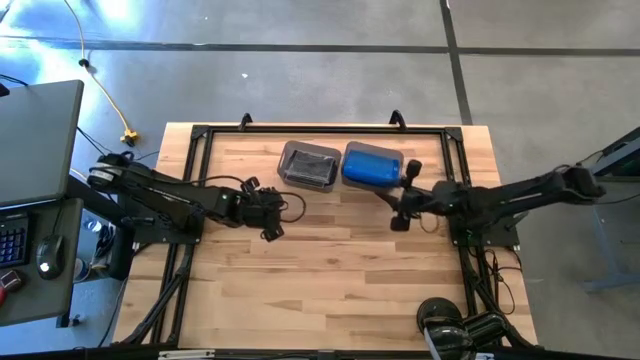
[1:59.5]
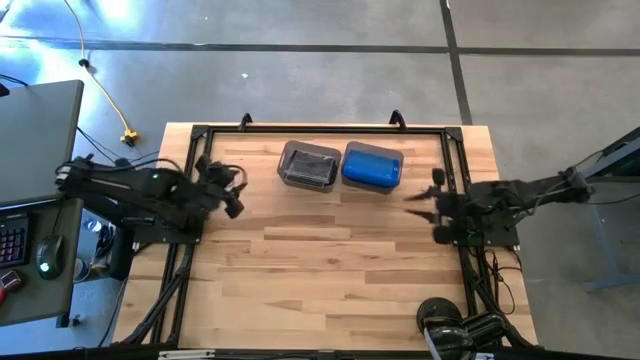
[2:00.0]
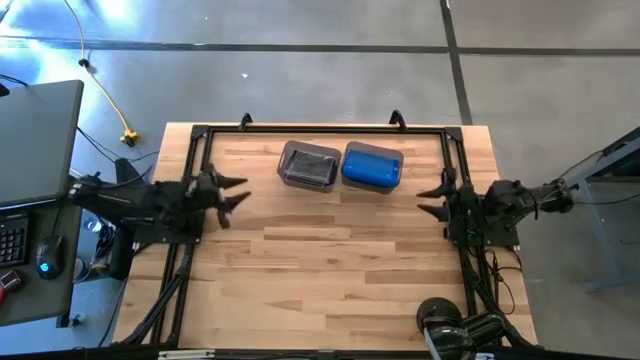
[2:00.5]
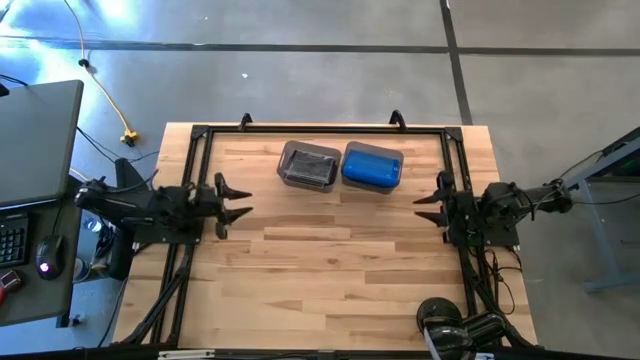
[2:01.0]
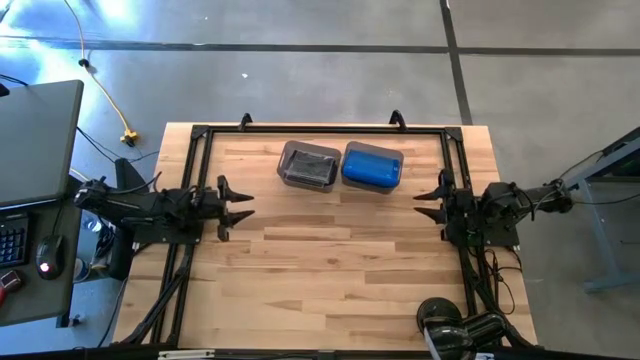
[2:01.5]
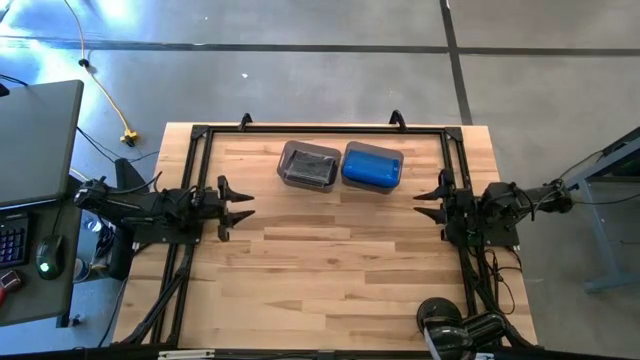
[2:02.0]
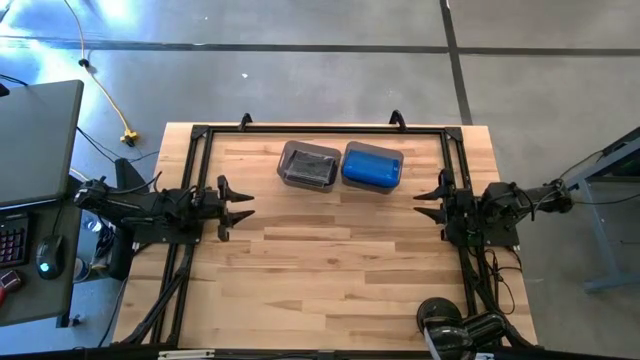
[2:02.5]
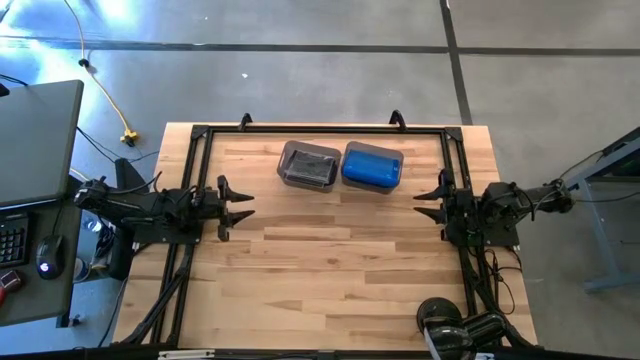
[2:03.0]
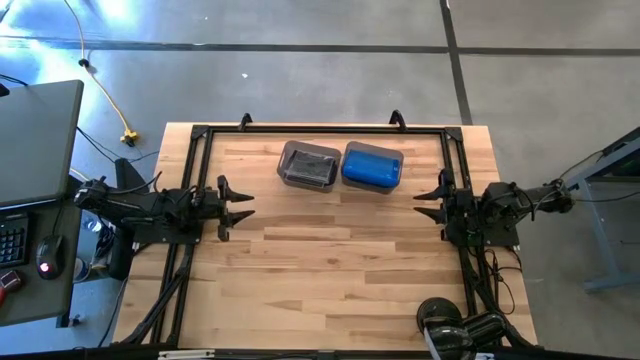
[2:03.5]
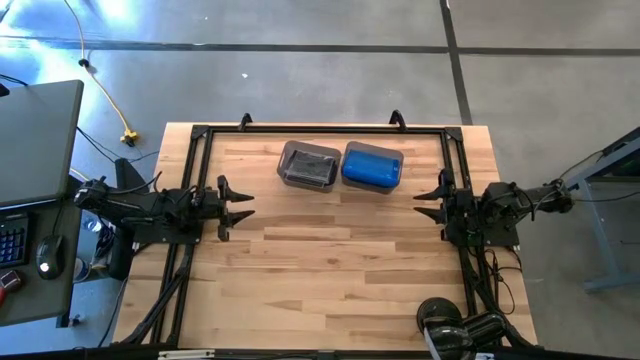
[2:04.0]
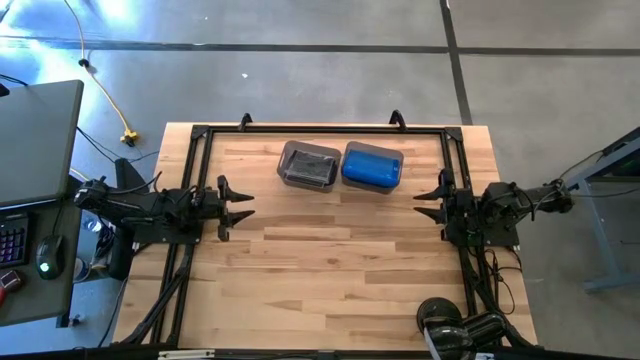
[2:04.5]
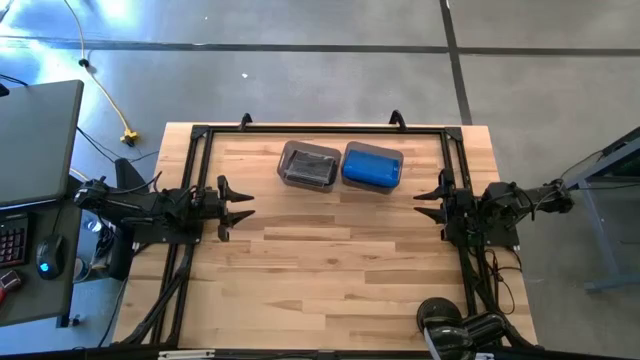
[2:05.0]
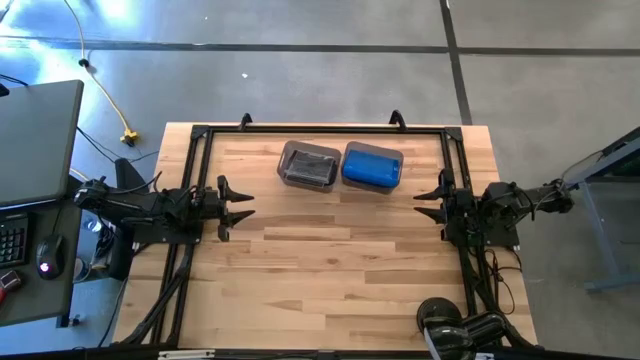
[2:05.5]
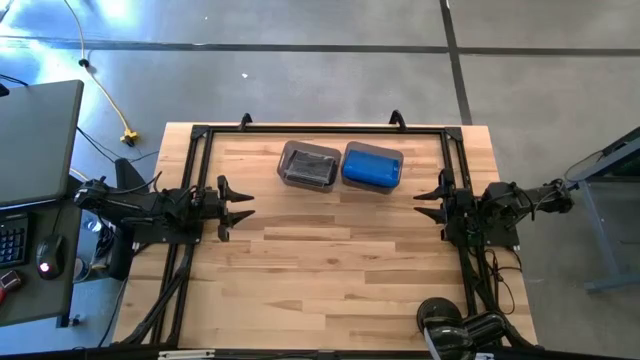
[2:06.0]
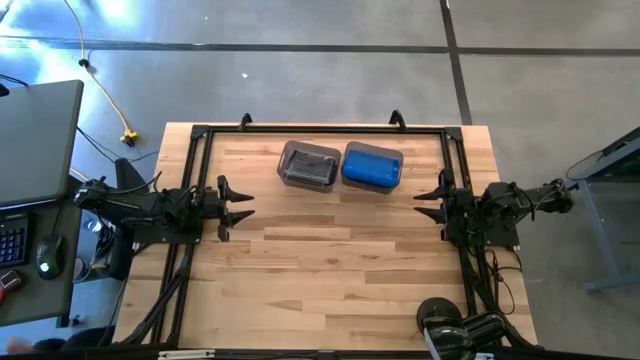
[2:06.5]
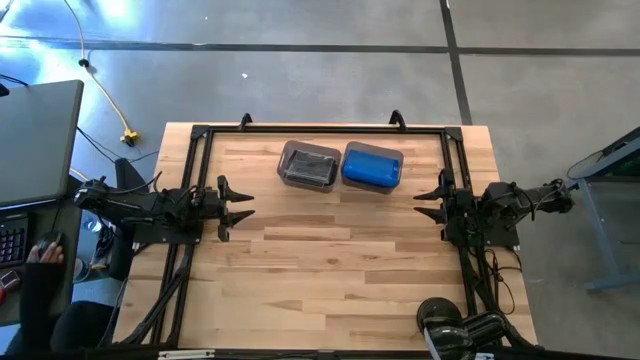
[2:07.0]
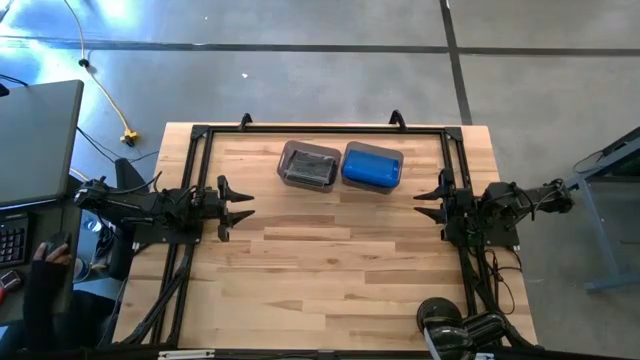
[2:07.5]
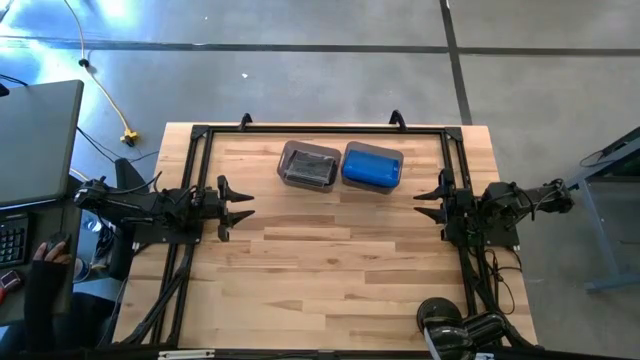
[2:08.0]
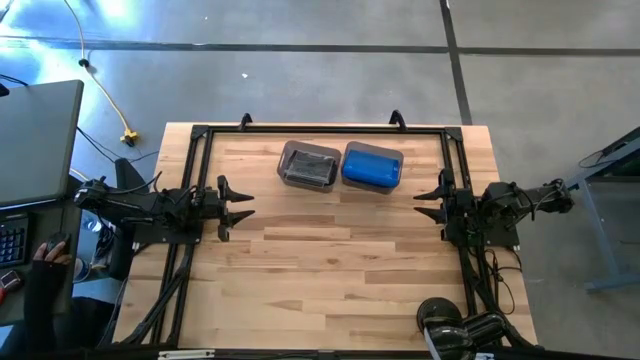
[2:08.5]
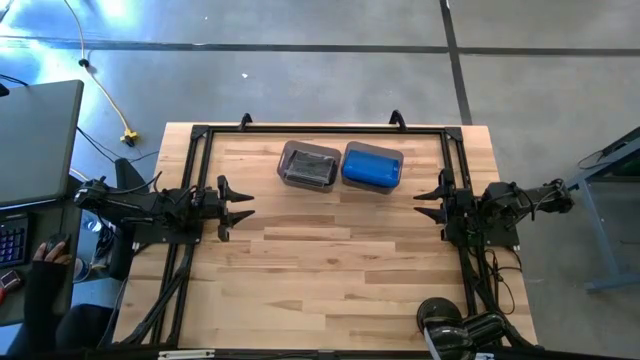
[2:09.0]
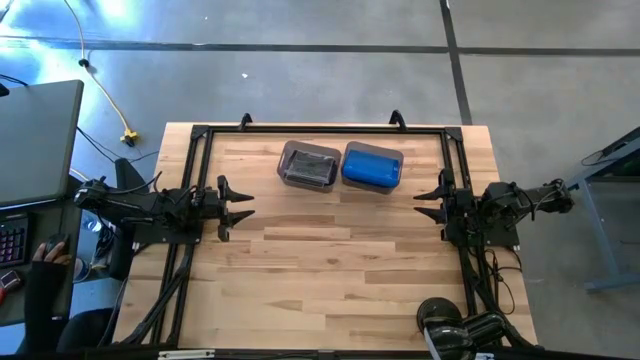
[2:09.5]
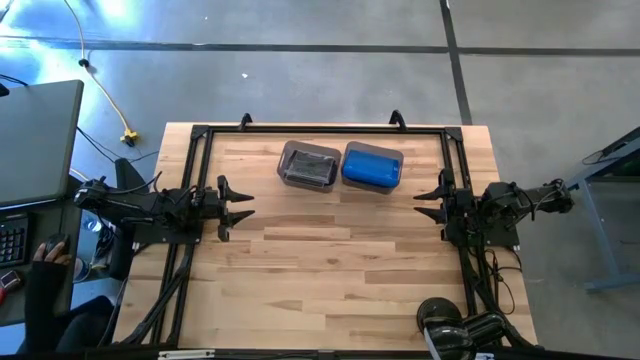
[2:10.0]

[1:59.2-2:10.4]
Task: Pick & place jewel cases by type
Return to Home Position
